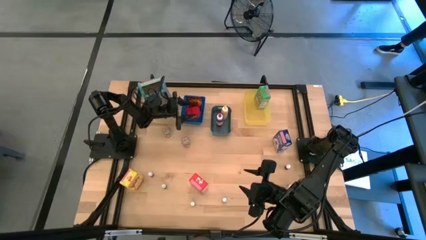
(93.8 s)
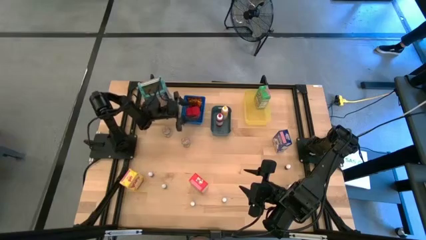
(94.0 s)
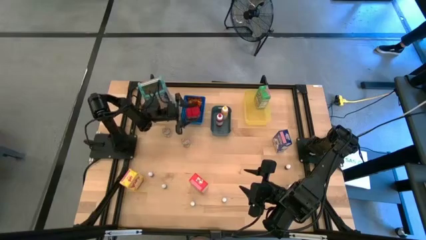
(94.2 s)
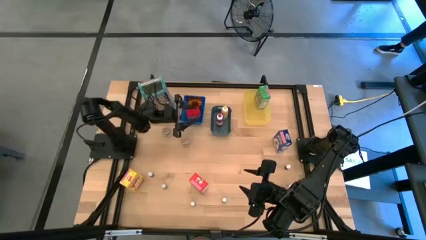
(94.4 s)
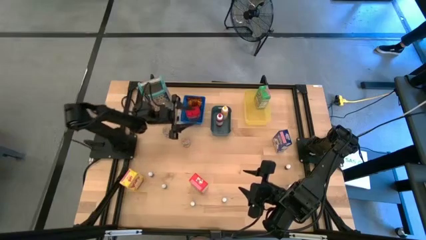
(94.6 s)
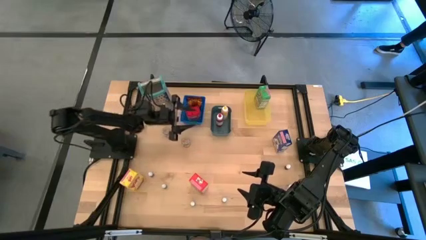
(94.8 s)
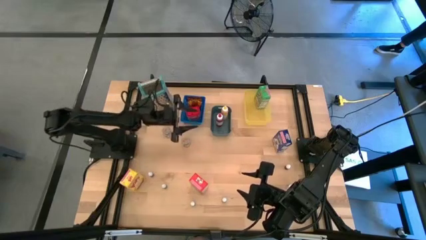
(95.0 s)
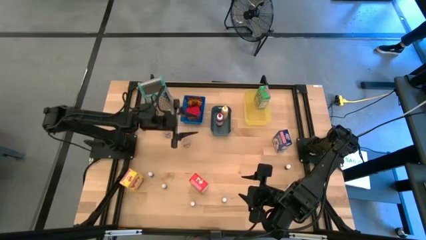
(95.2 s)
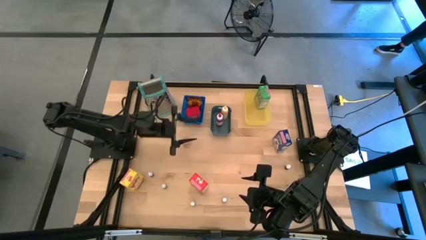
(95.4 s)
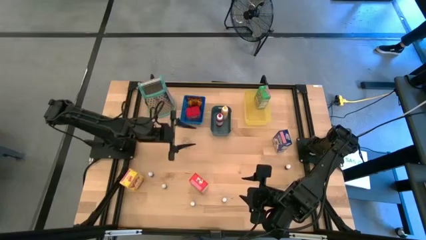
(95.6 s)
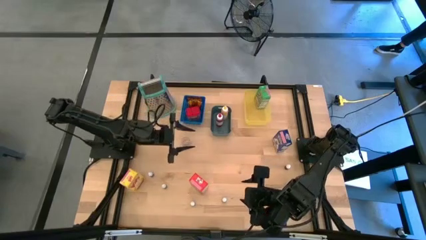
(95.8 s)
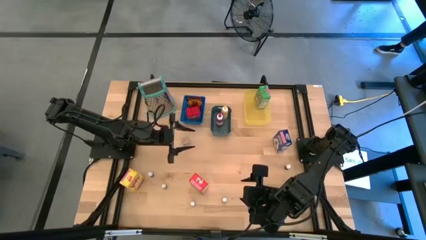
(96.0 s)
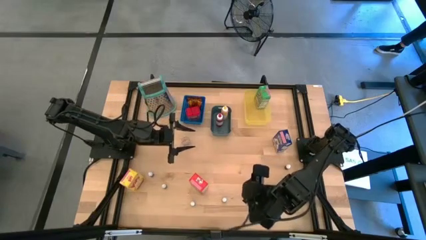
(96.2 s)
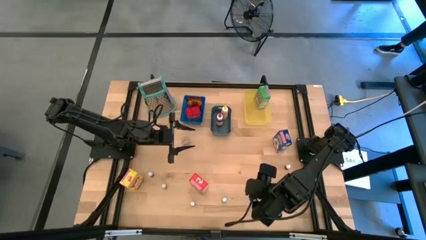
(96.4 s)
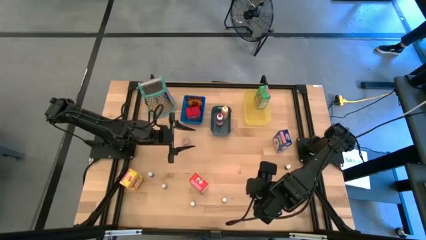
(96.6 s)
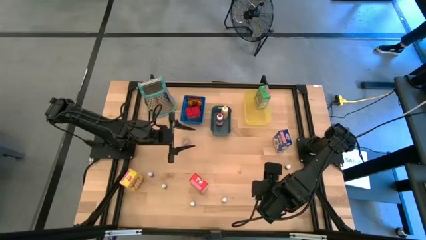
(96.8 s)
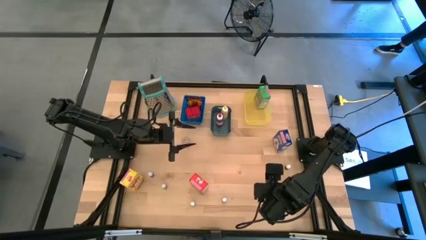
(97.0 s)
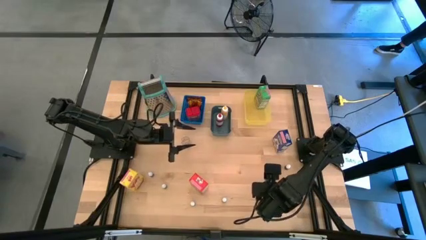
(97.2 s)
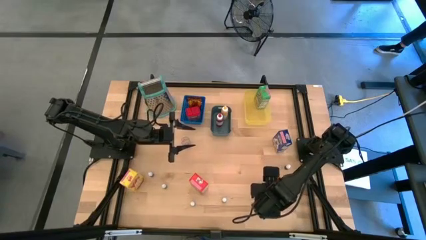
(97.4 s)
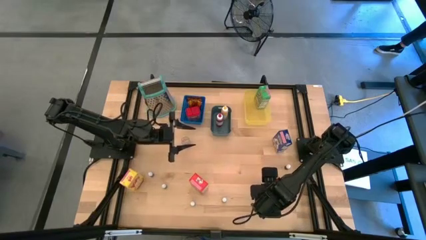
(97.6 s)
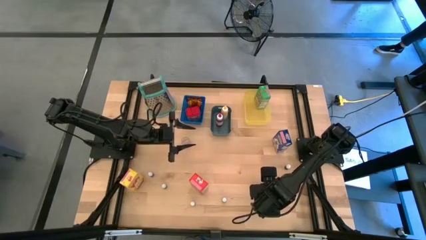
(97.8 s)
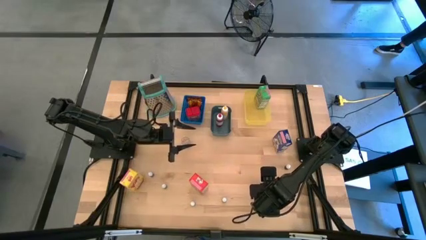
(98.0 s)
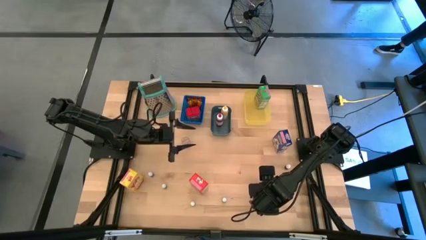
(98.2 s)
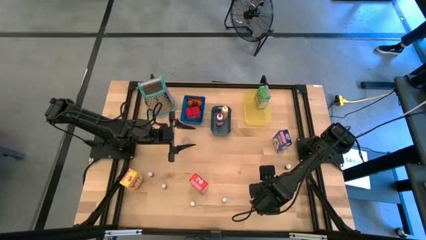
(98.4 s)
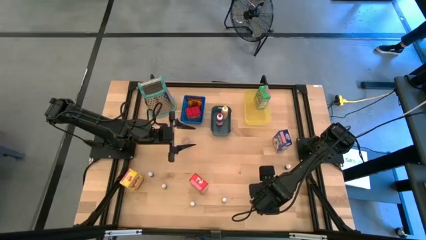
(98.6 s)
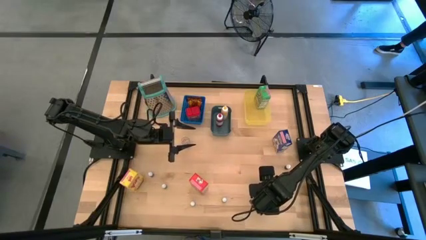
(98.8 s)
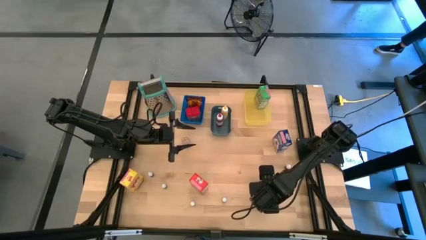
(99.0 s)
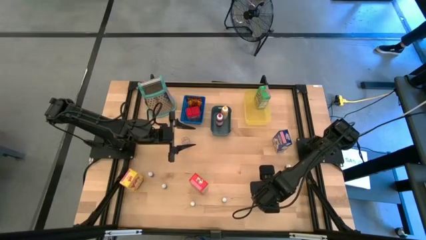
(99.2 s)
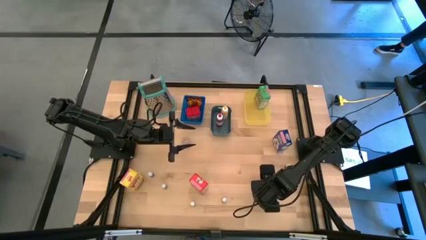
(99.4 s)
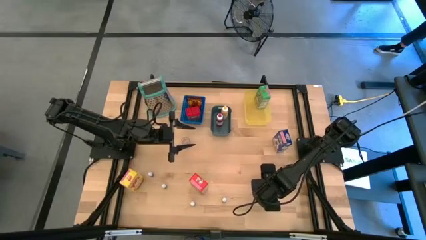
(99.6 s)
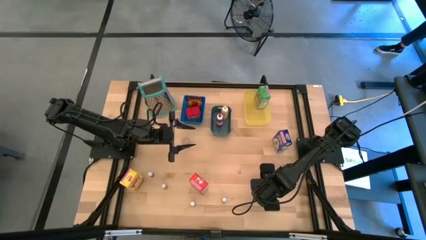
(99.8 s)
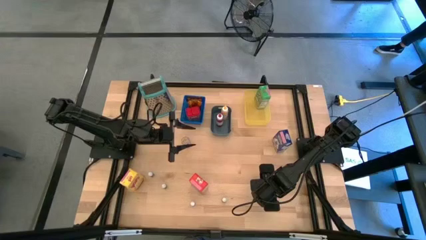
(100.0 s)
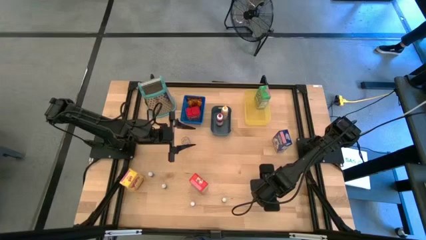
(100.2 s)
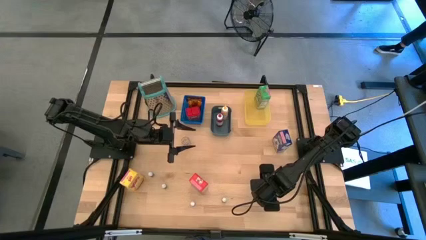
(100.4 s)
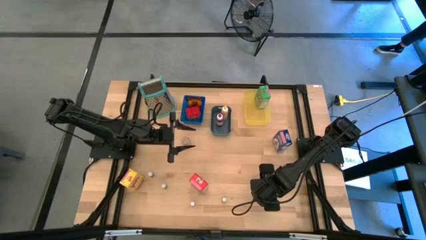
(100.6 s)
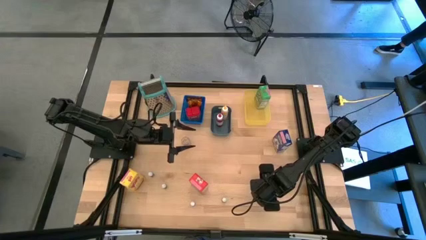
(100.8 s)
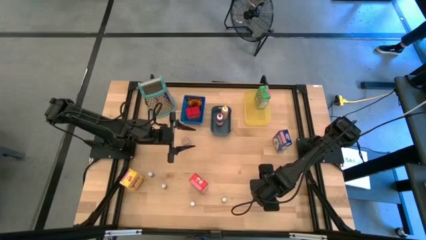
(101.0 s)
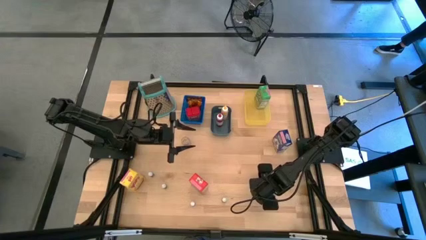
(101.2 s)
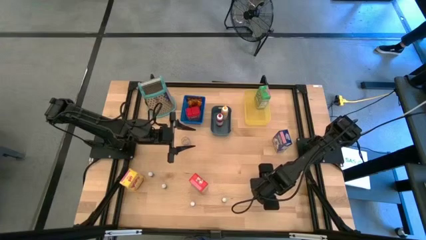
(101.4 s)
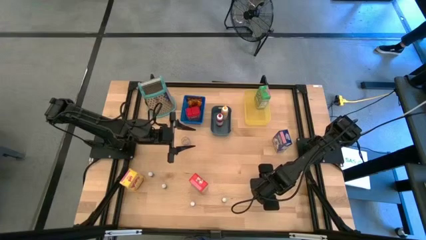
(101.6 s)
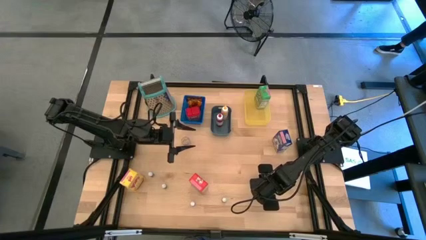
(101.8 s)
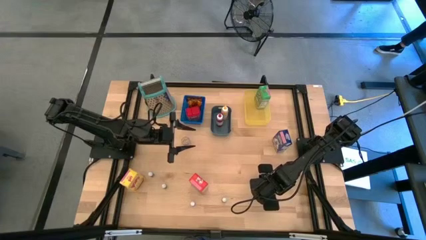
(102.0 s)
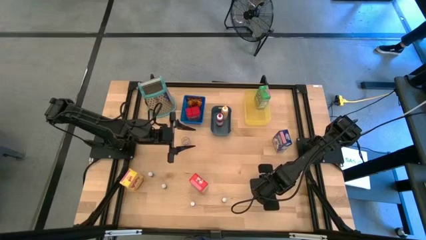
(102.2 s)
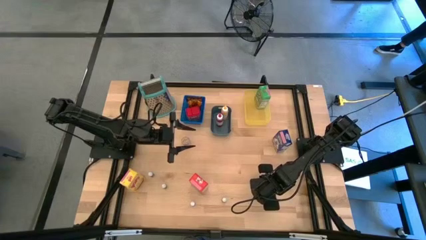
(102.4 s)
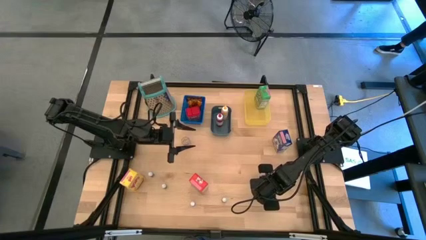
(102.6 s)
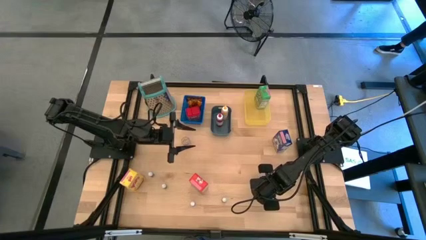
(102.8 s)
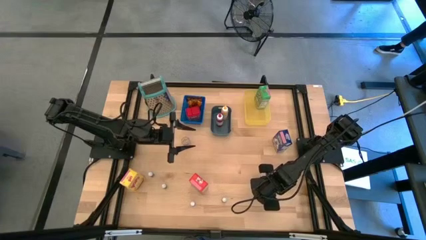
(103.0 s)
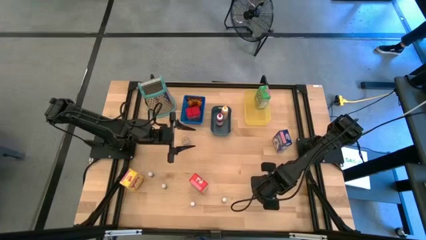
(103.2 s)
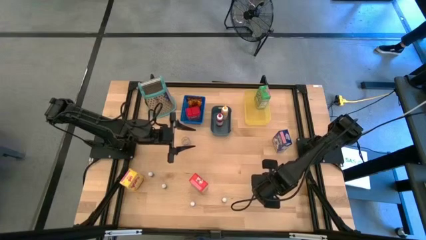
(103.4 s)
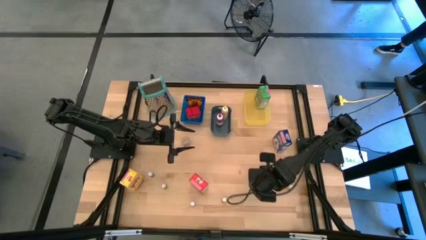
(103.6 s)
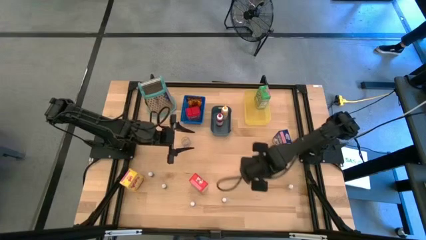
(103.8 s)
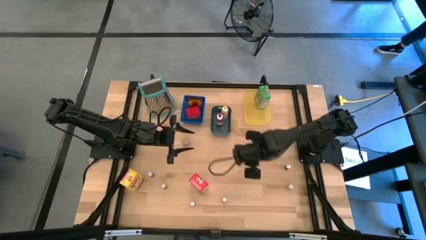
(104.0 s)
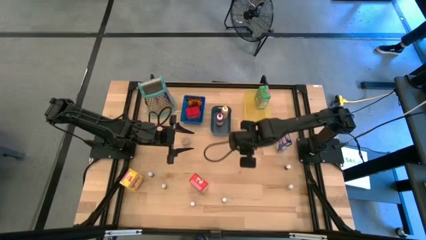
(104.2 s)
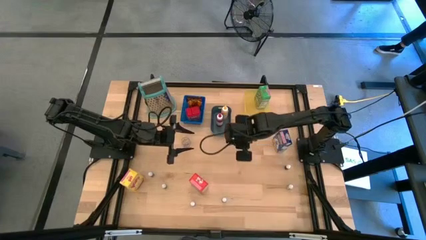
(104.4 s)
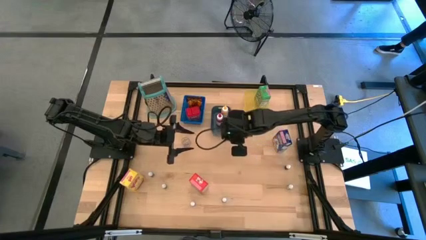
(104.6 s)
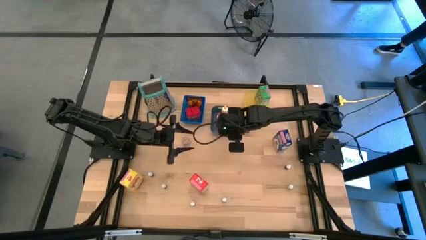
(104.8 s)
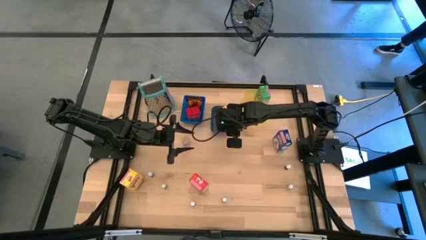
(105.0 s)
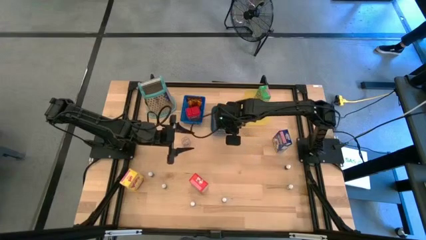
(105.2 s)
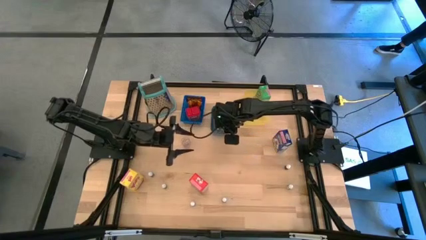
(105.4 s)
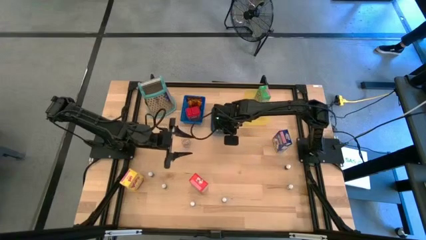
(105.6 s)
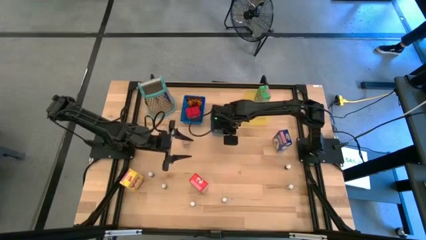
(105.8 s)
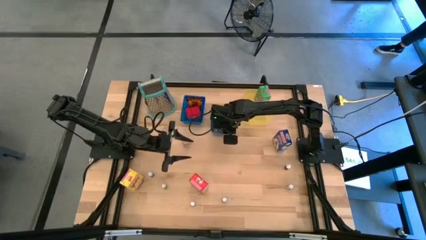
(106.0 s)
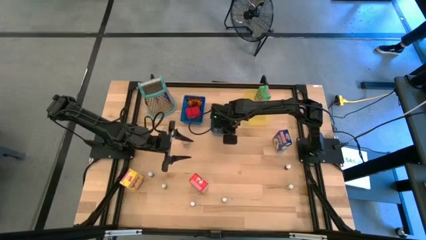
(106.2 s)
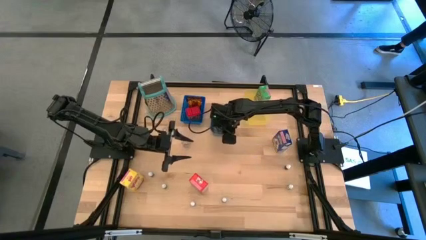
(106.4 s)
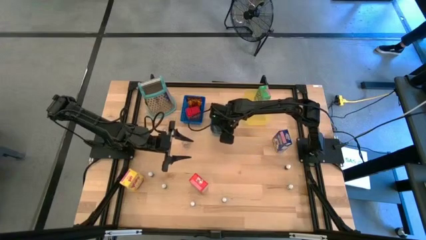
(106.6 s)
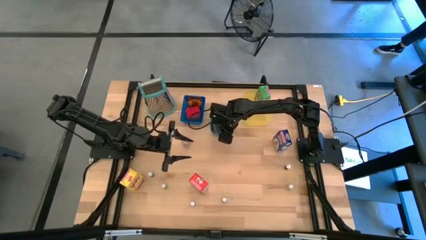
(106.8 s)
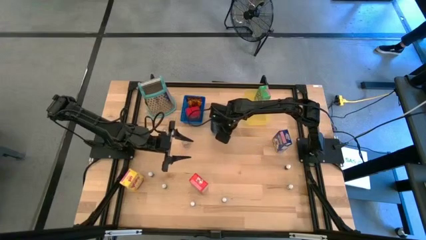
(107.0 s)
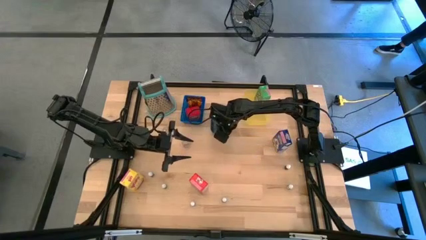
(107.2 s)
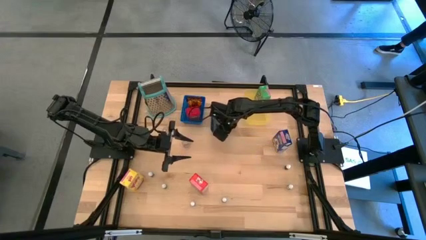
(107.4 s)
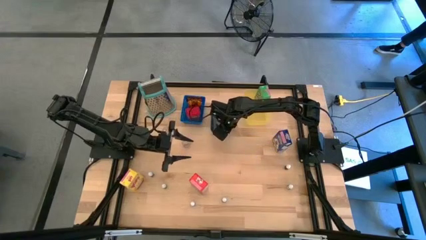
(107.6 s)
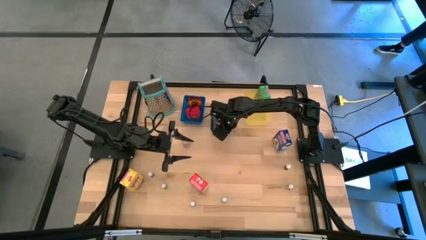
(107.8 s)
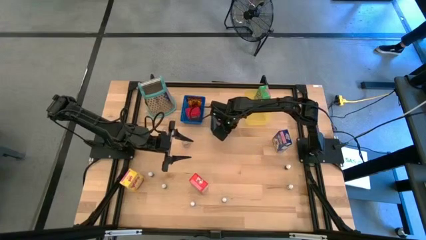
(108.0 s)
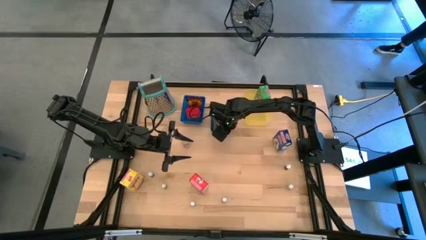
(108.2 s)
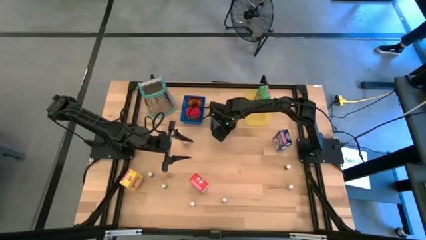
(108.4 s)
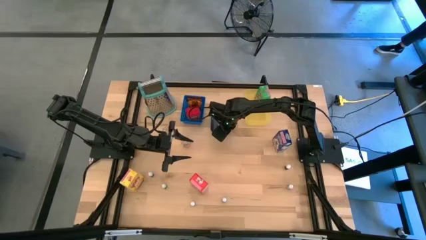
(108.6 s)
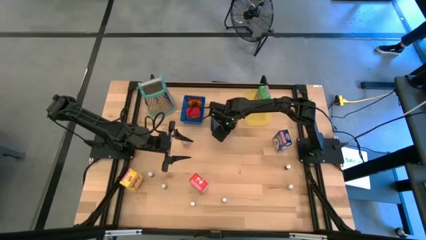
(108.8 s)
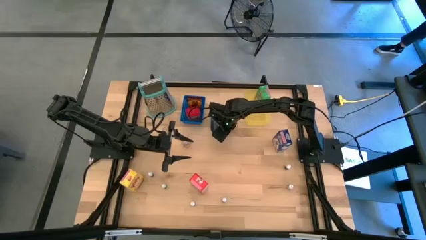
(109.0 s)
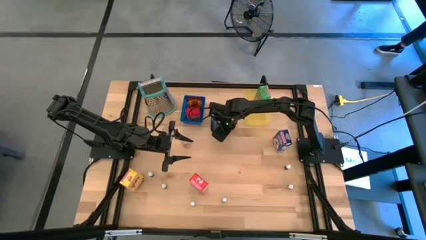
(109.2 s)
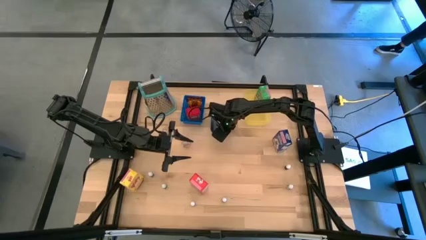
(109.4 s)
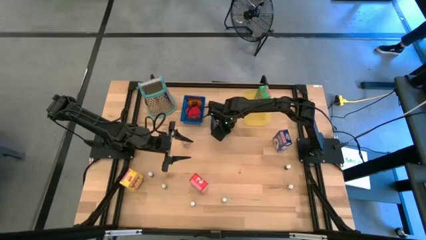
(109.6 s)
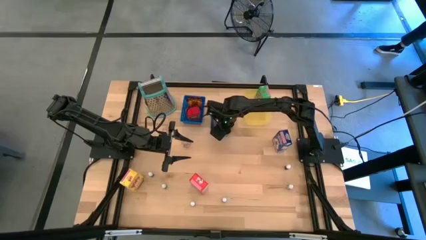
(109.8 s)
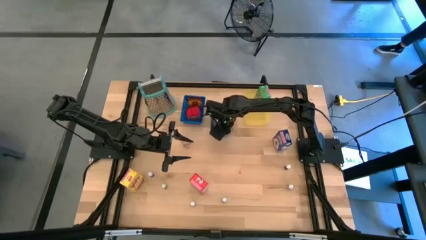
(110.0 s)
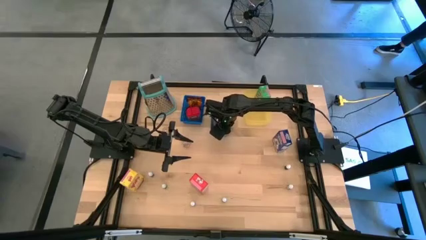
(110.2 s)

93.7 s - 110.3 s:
Task: Pick & Place Kitchen Items
Put the small black food coloring bottle into the dark green bin

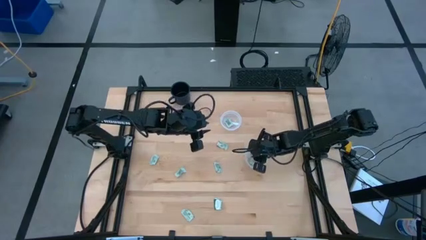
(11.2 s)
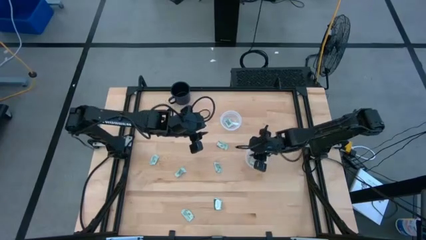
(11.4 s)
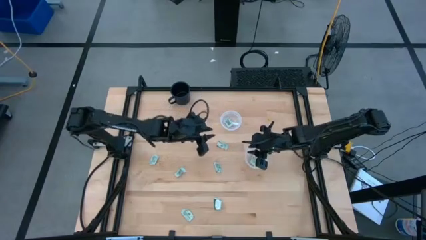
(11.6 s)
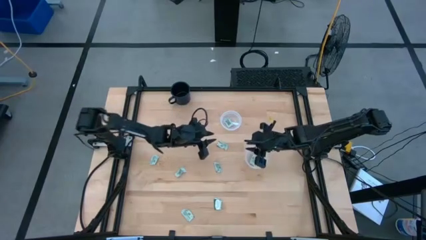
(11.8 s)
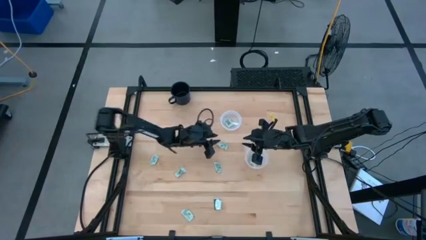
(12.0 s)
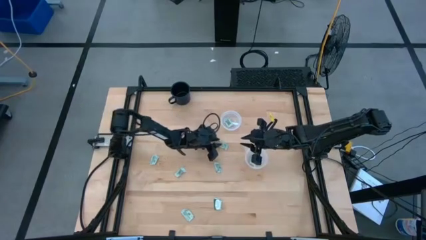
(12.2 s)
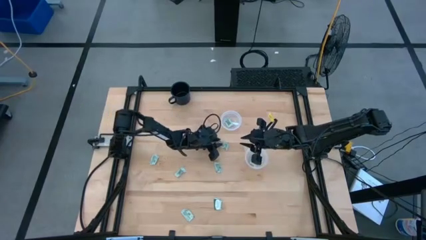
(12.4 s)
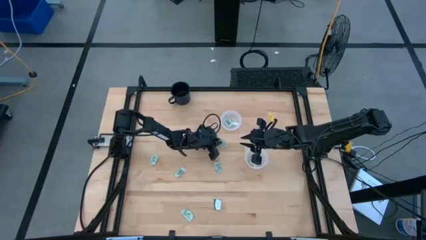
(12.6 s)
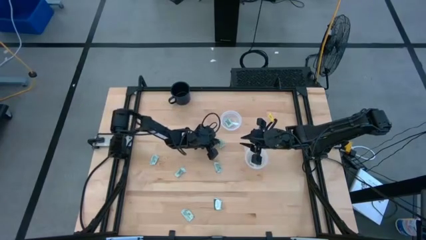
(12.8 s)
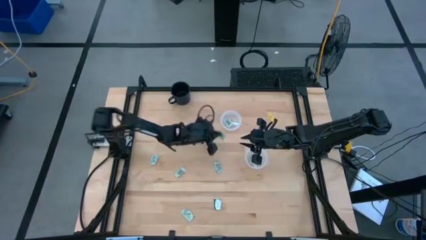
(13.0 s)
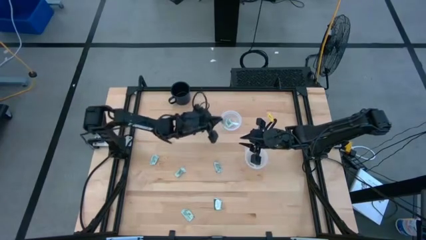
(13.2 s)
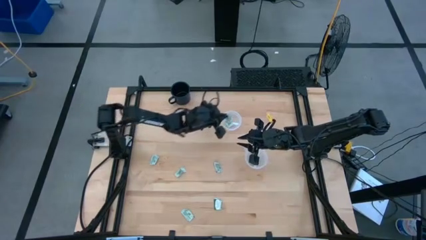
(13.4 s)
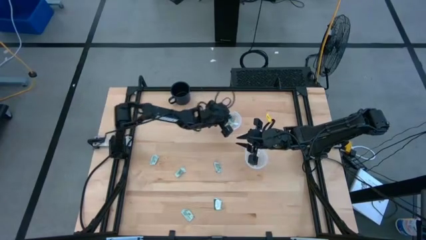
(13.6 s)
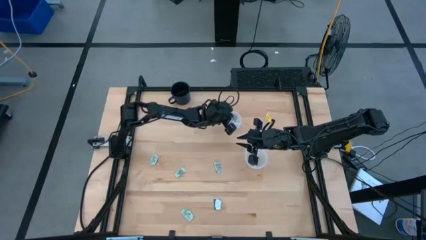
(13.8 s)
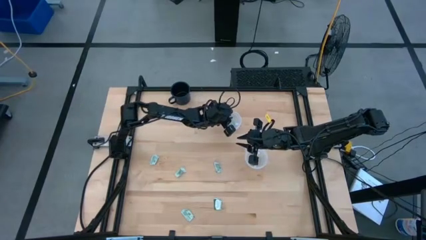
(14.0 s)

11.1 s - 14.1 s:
Task: Pick and place items into bin
Put the stevia packet into the top transparent bin
